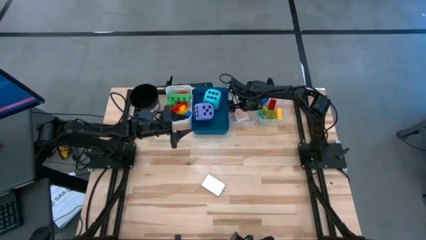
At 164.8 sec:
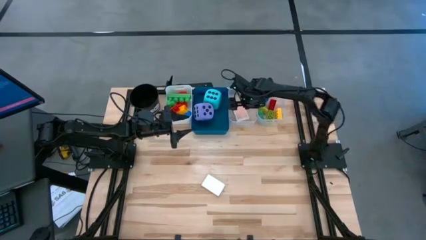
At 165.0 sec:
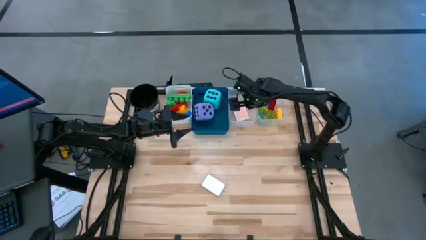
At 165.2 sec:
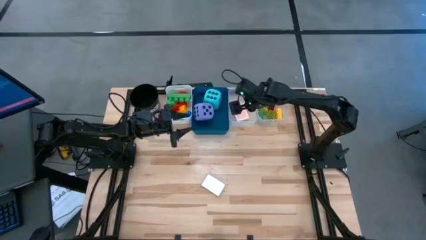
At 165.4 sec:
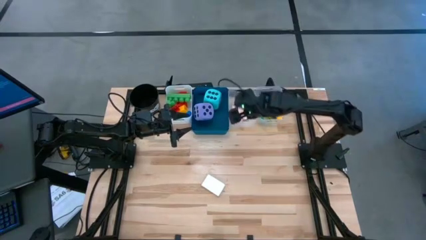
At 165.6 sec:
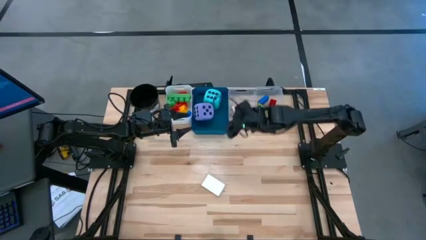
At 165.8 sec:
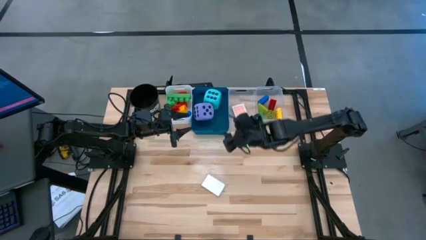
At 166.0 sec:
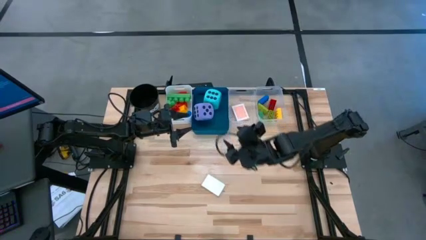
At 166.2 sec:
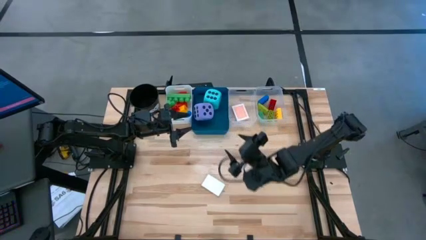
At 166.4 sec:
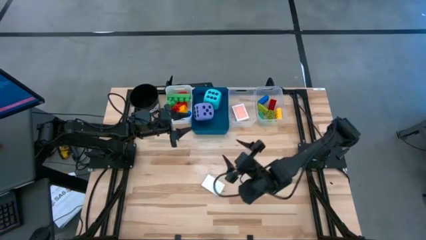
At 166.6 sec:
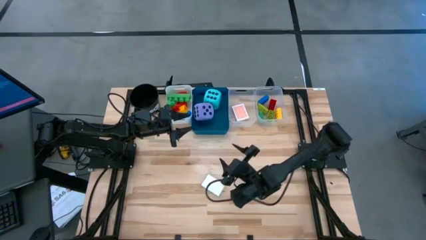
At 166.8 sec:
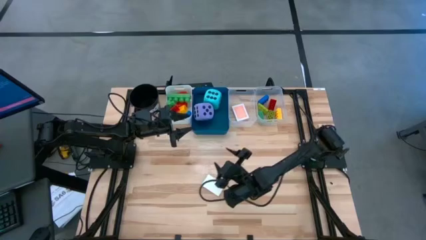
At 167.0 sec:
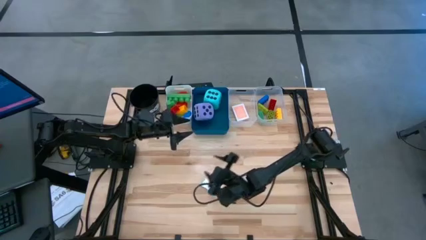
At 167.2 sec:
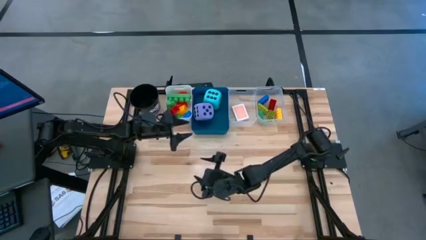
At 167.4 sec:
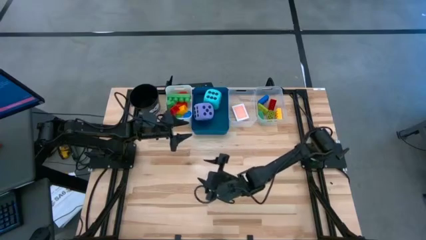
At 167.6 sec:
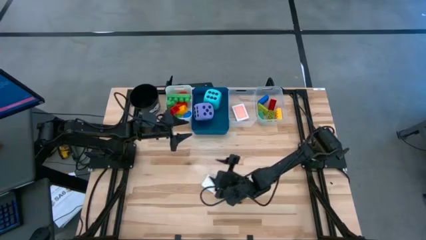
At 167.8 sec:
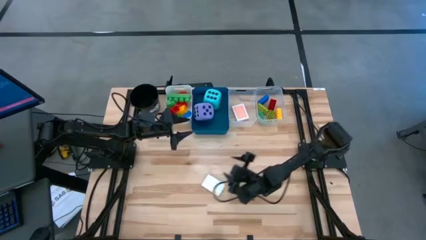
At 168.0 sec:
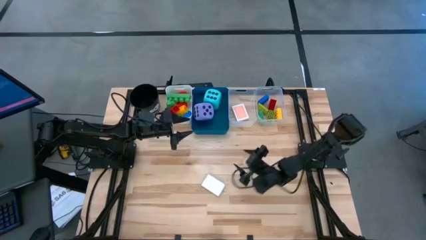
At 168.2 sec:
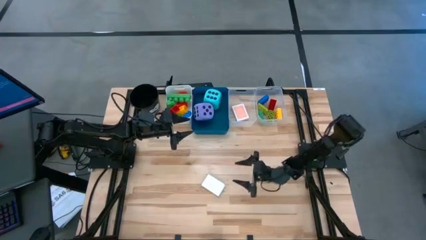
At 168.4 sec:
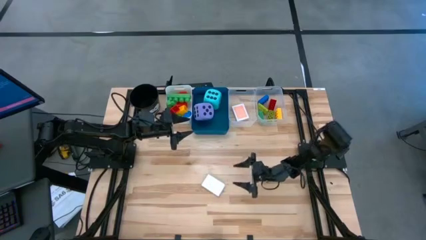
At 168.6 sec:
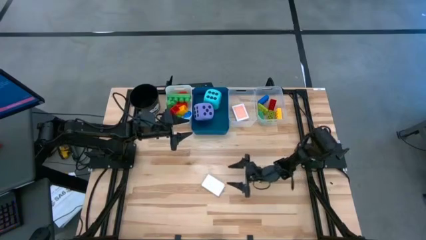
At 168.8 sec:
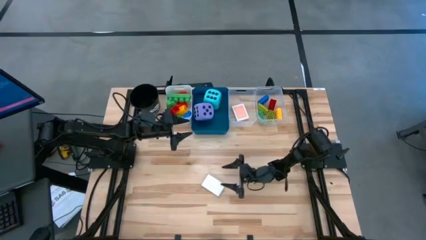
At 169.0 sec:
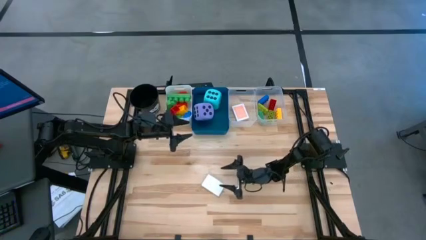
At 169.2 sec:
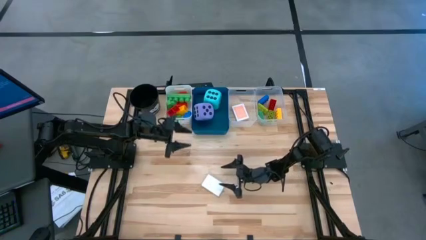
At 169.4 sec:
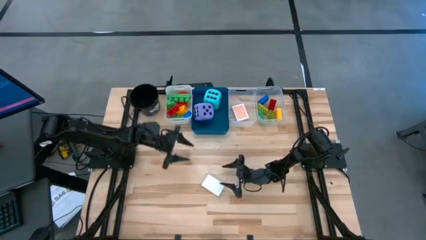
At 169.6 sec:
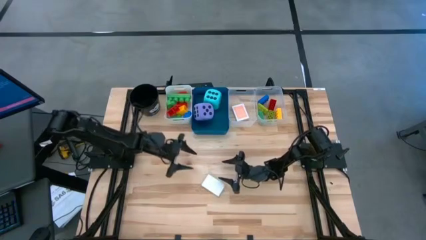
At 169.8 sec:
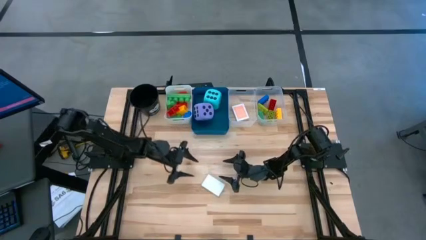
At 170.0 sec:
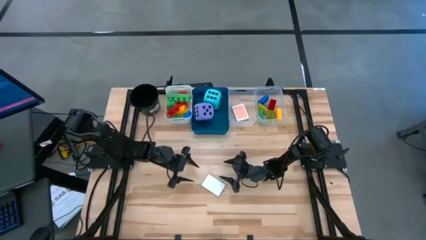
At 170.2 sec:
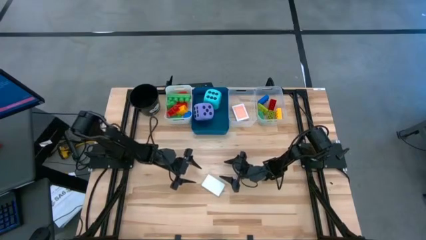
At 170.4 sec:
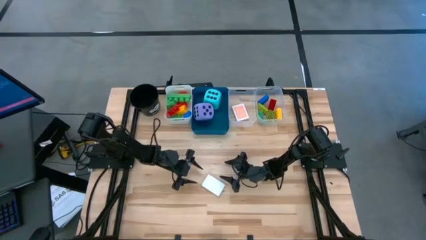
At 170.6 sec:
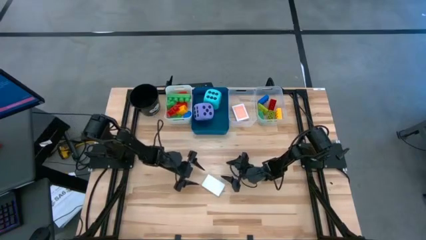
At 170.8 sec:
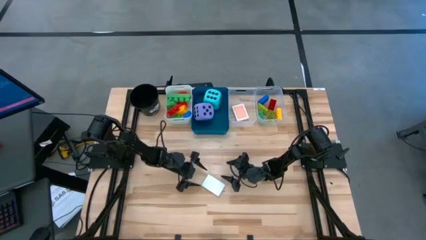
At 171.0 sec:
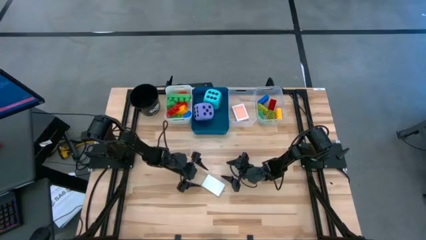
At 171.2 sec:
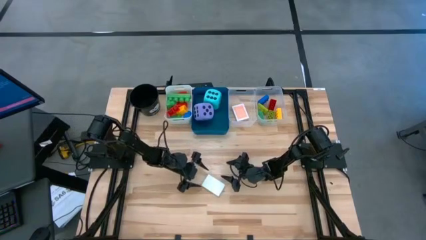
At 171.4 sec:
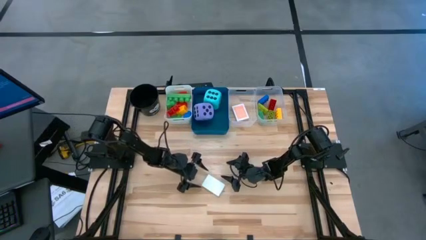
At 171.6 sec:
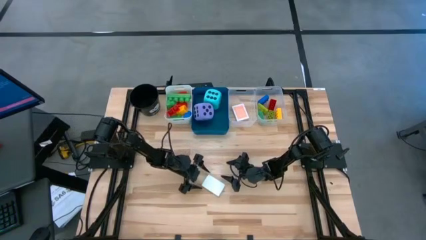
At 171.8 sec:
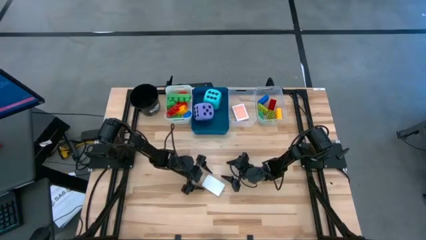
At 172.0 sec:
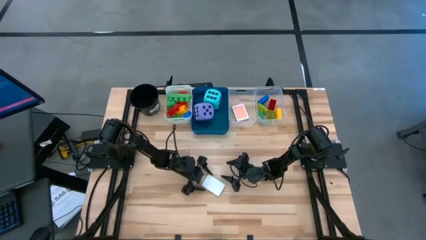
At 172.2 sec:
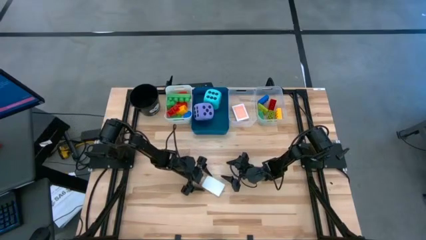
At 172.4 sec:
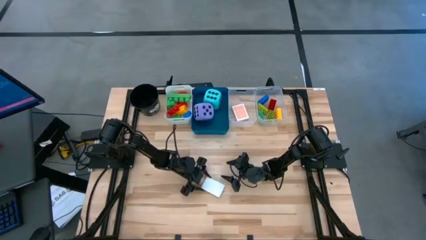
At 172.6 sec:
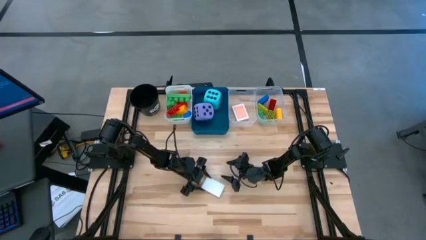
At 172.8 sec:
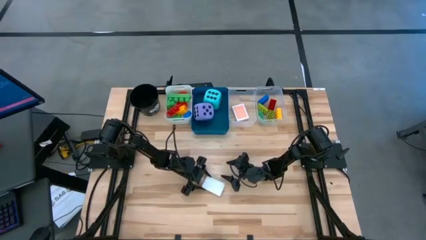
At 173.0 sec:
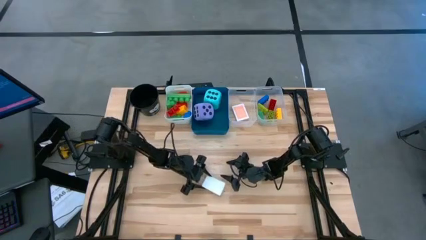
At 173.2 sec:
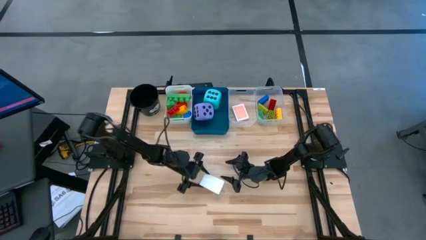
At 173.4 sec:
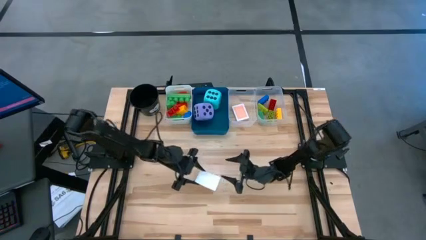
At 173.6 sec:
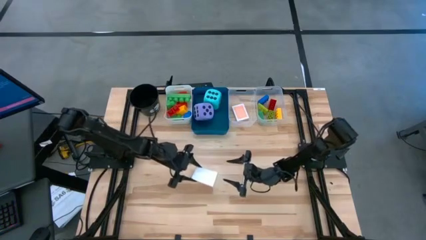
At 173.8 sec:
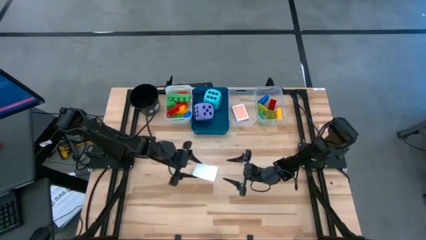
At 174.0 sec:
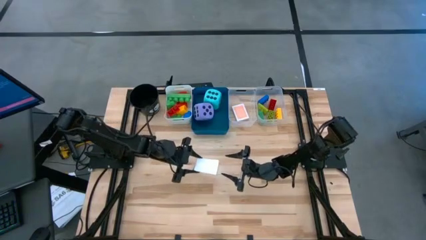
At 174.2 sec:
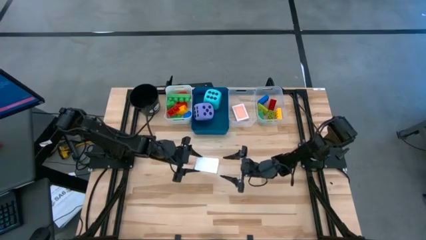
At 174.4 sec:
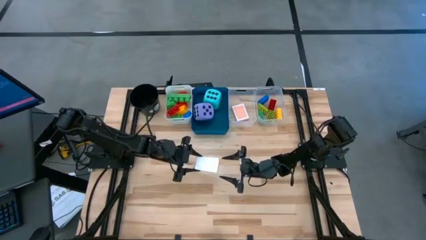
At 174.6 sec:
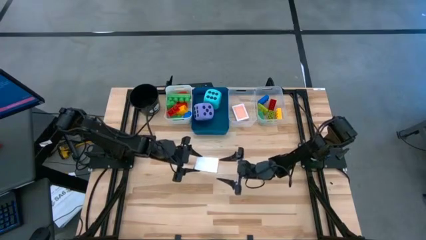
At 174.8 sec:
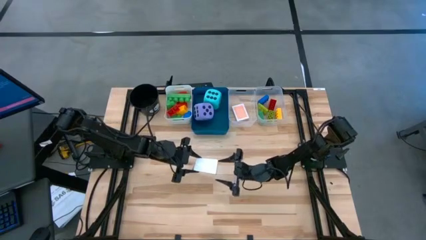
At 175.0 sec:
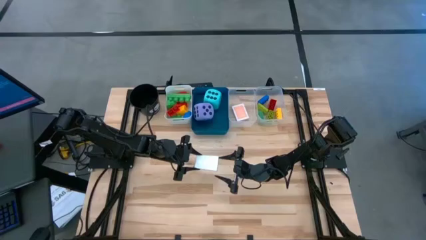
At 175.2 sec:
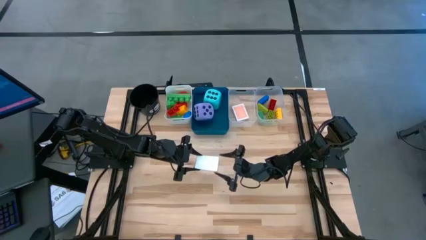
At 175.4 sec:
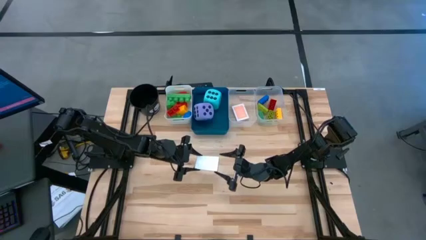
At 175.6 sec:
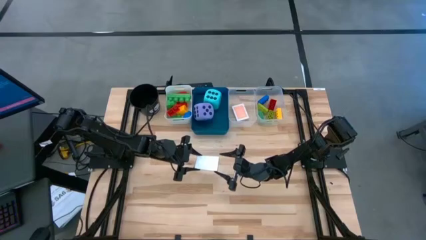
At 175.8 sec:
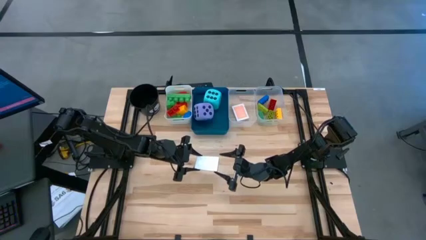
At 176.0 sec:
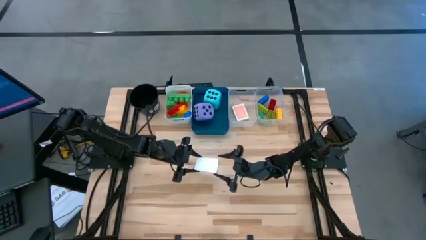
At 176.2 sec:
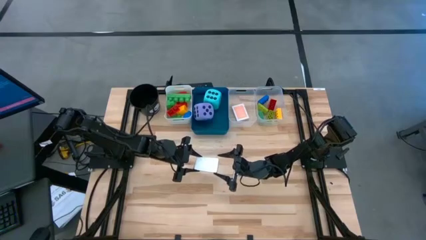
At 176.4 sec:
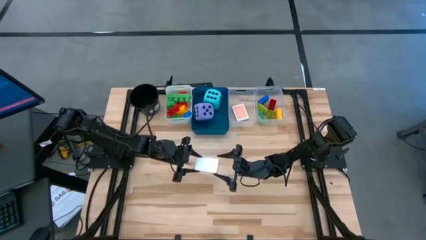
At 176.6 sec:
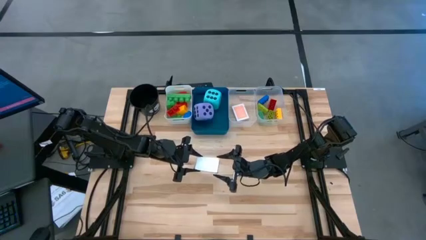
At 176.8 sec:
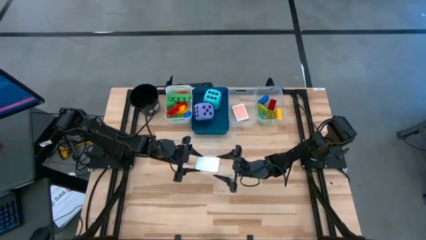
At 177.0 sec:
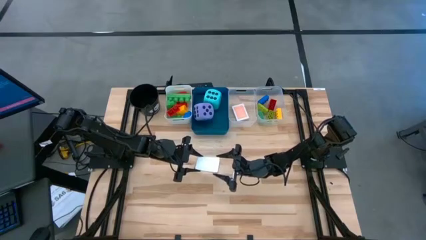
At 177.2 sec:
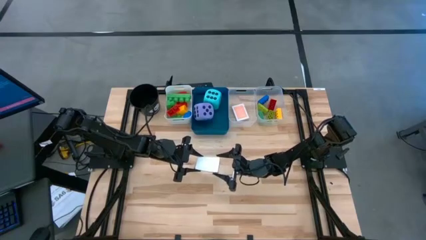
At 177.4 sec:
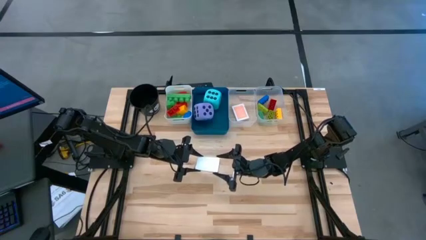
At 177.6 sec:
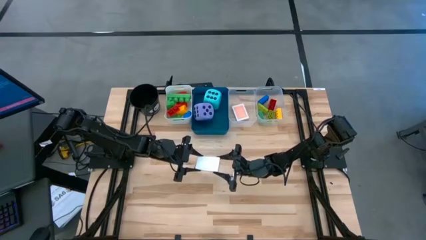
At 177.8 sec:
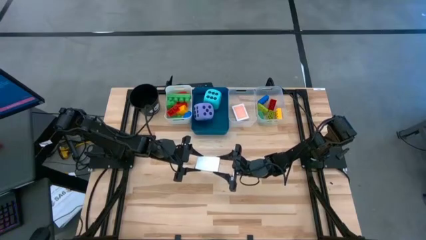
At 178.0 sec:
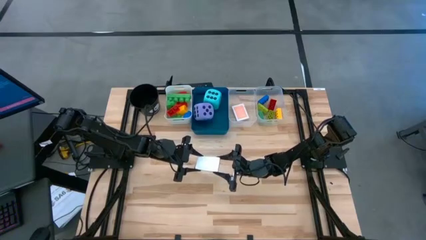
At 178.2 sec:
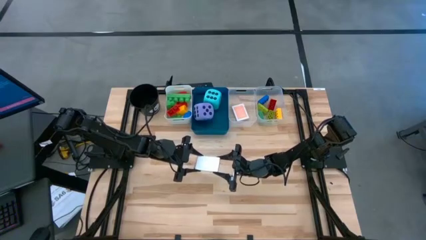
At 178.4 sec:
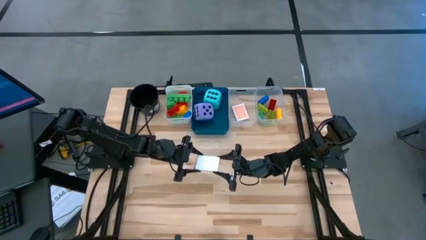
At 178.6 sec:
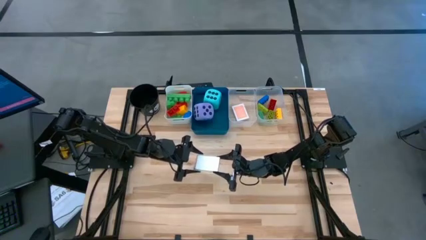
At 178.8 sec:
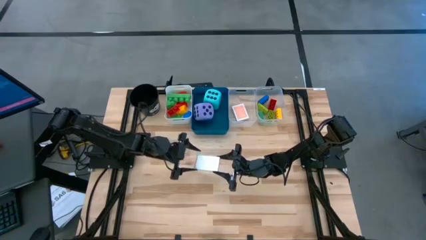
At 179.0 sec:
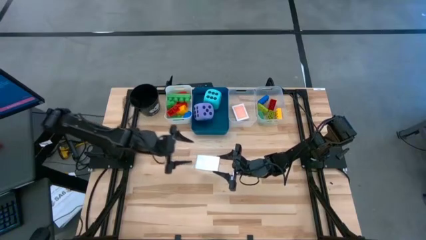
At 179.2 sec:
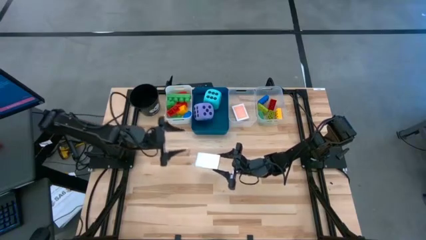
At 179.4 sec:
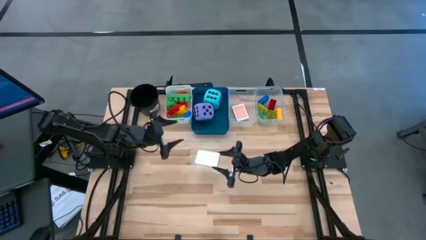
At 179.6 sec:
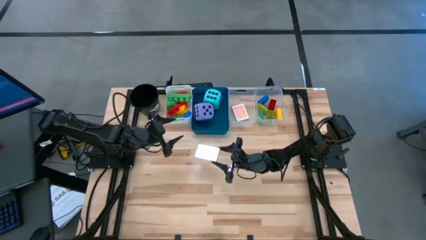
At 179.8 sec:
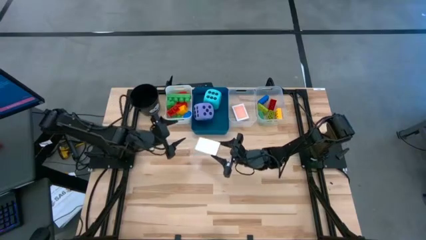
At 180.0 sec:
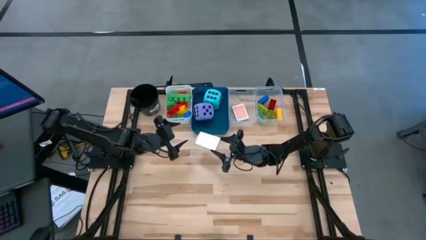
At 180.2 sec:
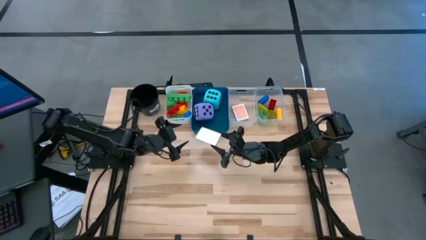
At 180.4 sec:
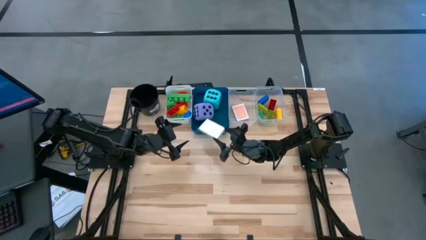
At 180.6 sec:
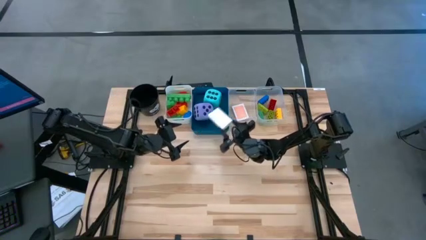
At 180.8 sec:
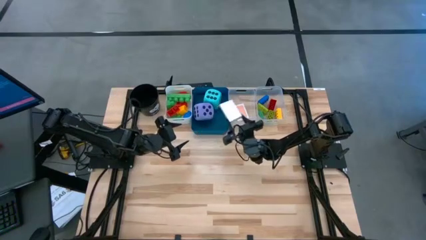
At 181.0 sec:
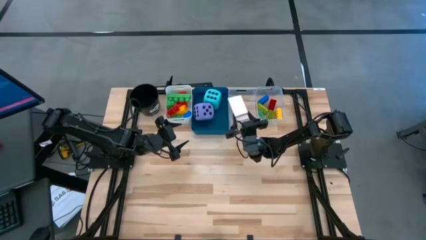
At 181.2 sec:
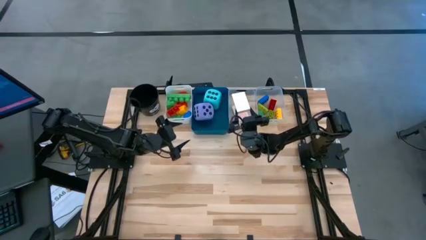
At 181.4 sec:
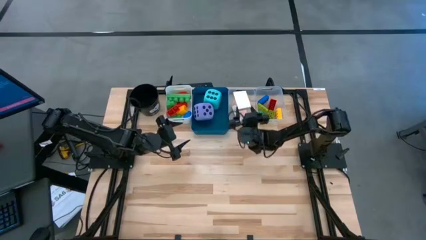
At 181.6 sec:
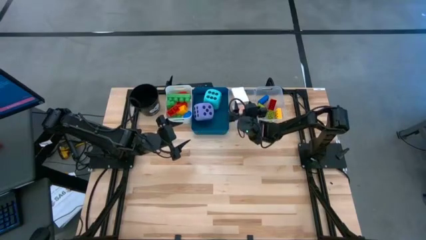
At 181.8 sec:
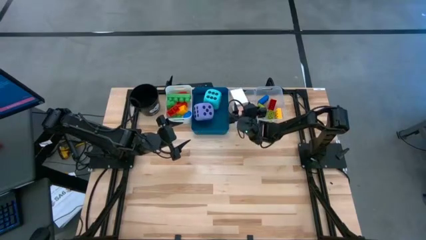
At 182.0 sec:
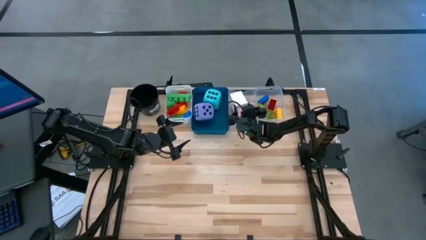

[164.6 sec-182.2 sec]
Task: Pick & Place Toys
Put the white game card into the left transparent bin
